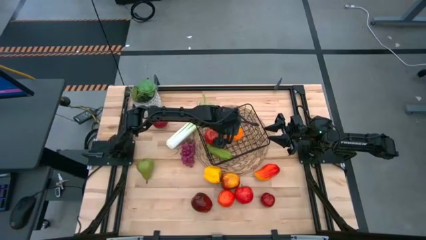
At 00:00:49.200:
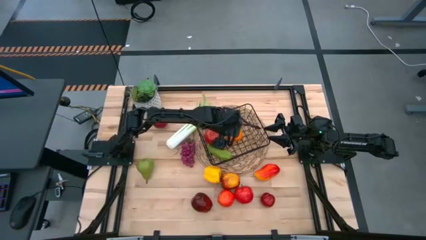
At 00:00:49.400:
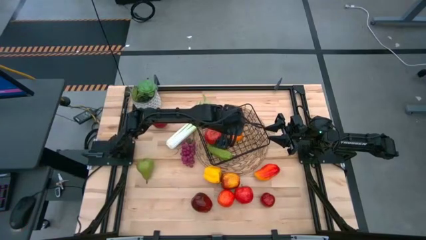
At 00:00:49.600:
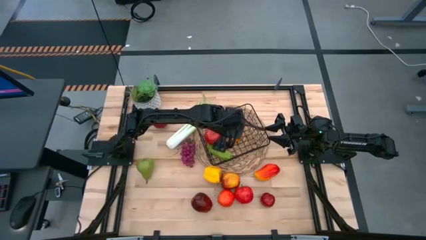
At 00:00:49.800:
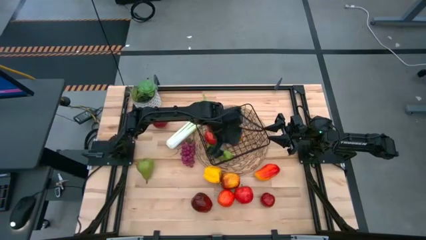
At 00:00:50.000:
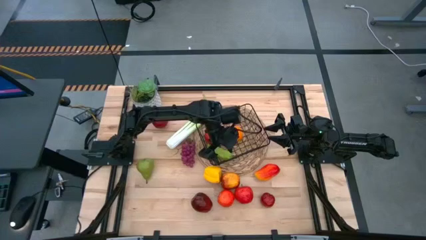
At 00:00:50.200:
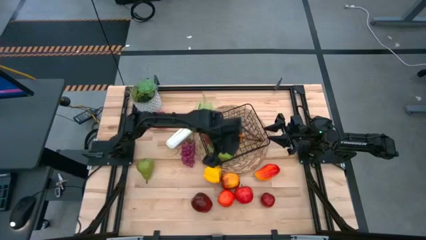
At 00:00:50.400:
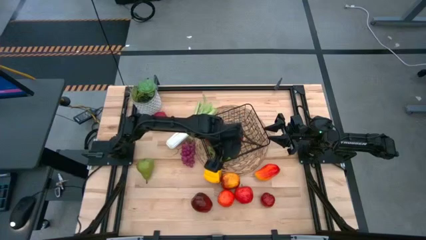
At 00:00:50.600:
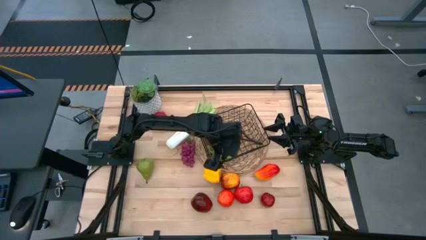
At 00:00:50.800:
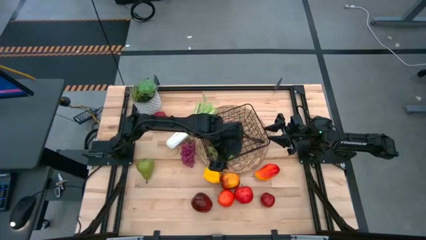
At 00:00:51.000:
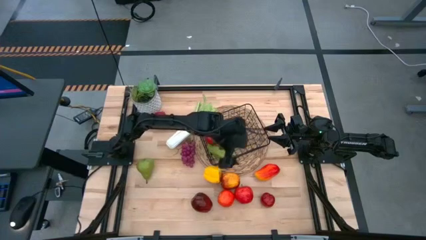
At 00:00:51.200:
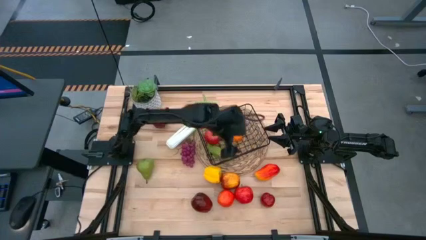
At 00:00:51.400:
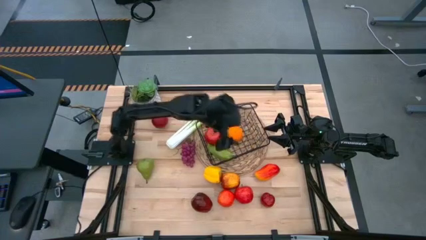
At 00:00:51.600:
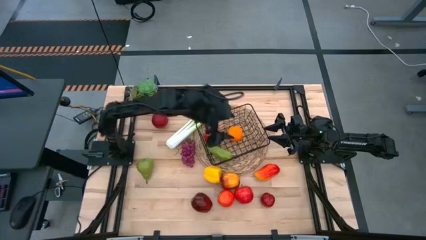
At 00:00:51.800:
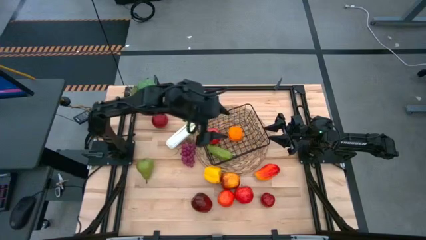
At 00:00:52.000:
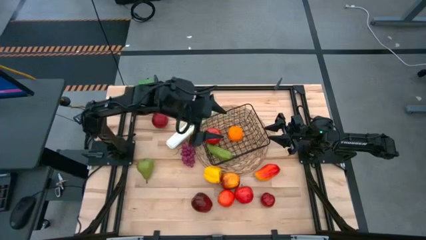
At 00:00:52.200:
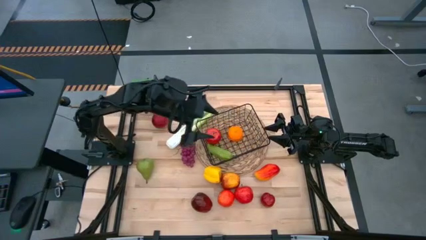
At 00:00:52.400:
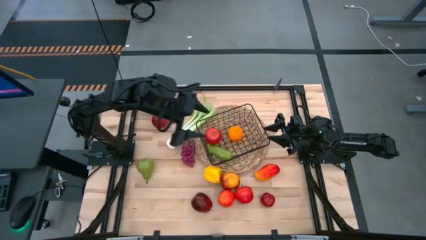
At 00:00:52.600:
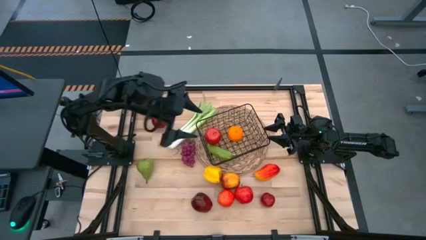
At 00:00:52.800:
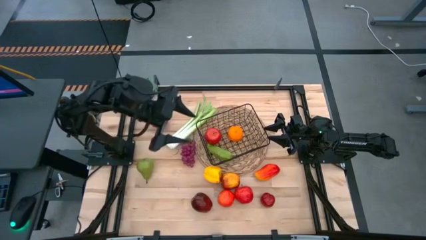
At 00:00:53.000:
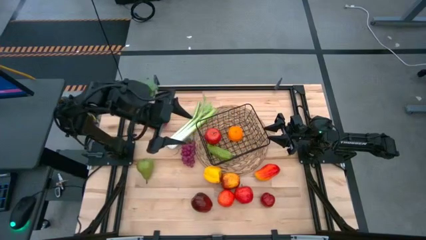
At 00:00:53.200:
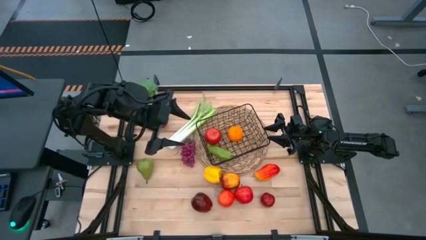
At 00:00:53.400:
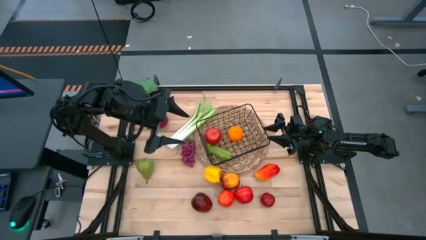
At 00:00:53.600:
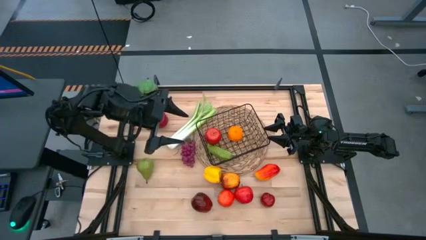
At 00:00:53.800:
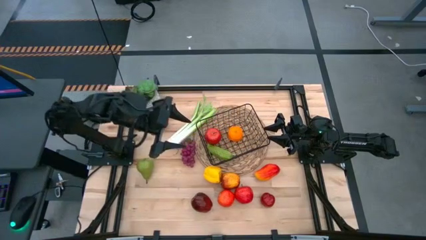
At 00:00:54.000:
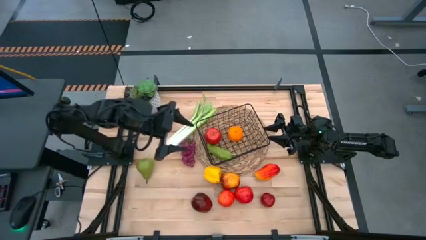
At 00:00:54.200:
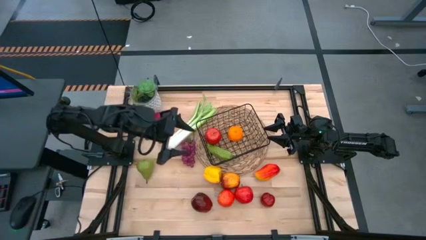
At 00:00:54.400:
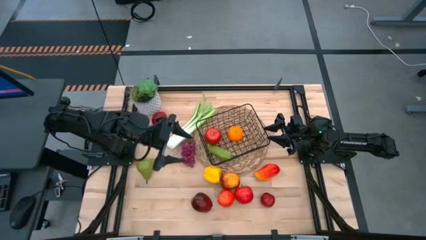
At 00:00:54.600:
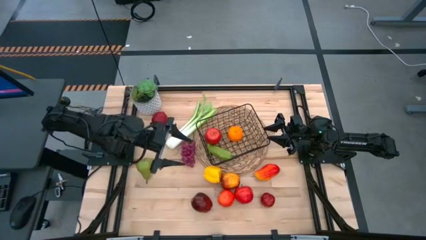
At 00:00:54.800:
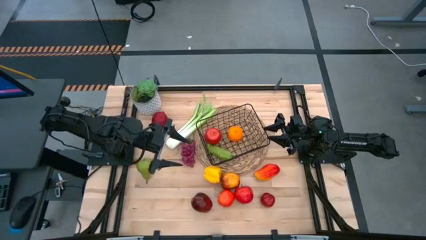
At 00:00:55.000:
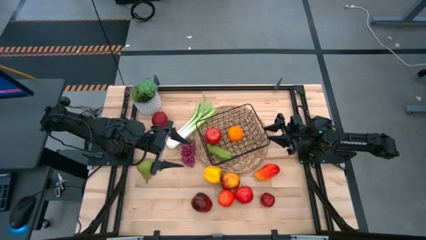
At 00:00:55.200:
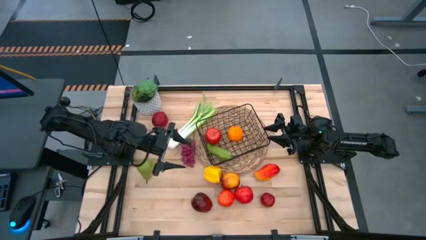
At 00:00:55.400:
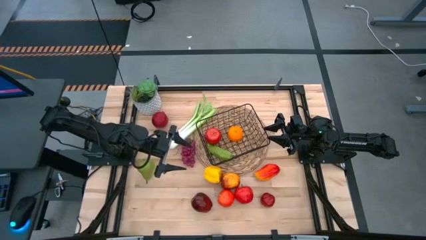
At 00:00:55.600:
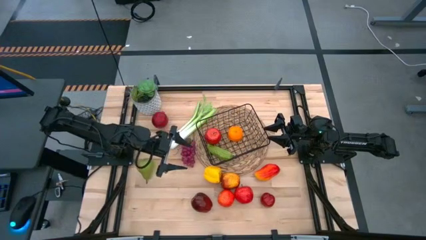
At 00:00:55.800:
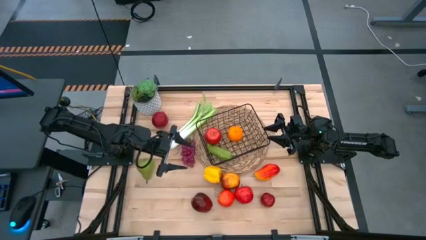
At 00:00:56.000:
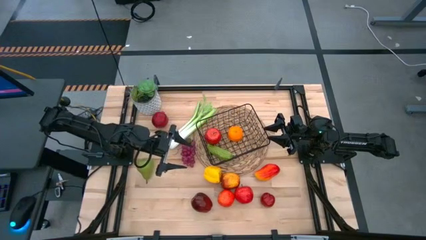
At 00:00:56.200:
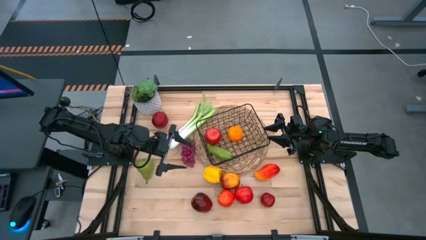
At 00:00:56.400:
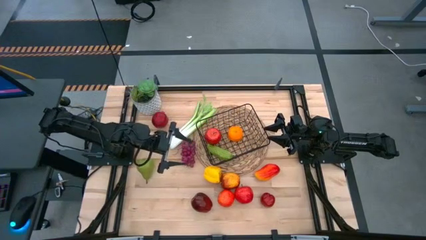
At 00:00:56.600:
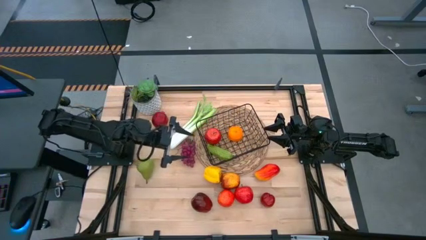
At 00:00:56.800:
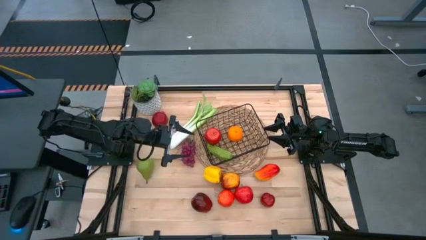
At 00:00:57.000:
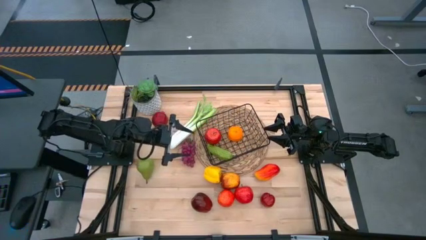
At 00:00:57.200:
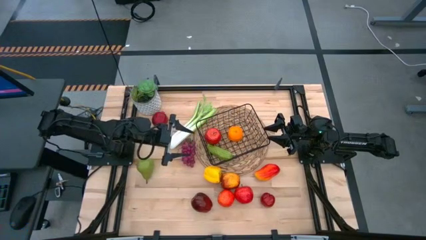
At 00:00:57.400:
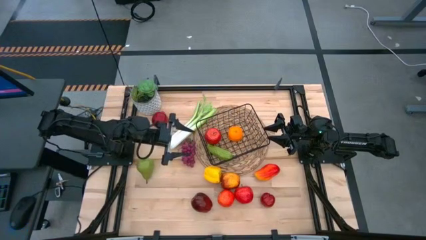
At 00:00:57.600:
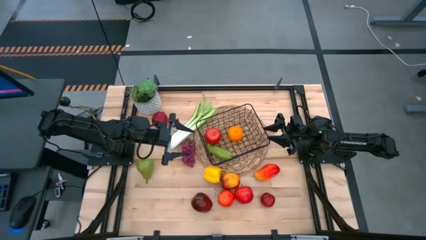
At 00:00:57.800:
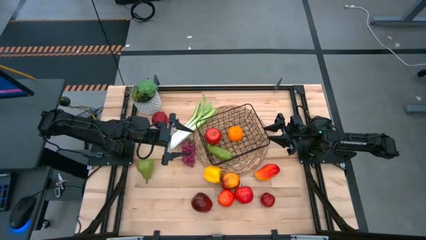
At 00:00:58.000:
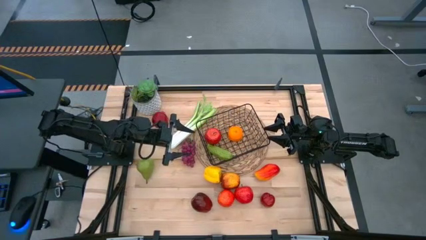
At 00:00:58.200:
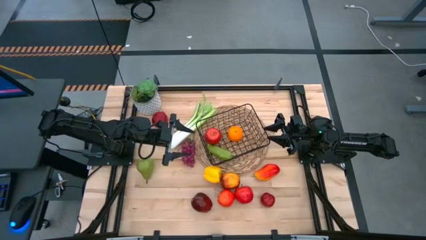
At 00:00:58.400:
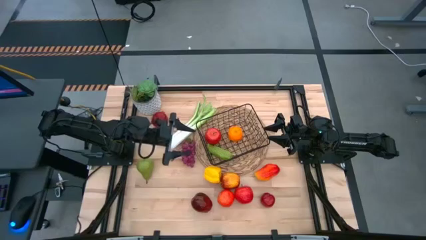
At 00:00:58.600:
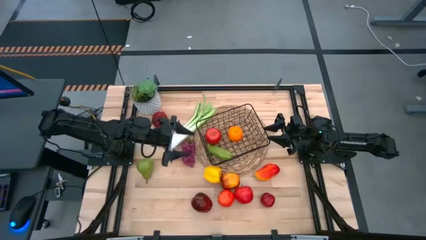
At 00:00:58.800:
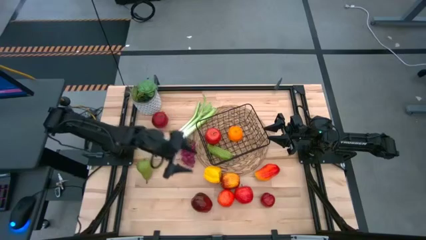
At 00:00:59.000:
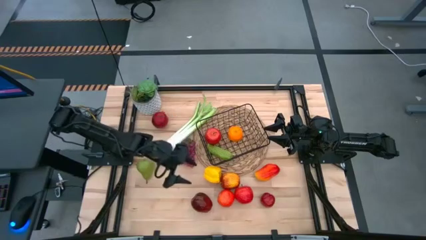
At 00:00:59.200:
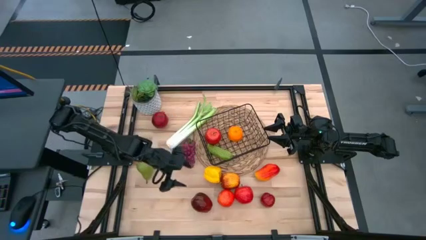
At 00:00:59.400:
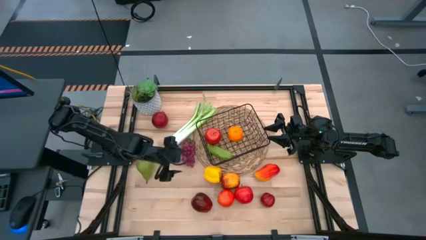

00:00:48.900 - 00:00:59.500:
Task: Build produce basket
Put the red apple into the black wire basket
